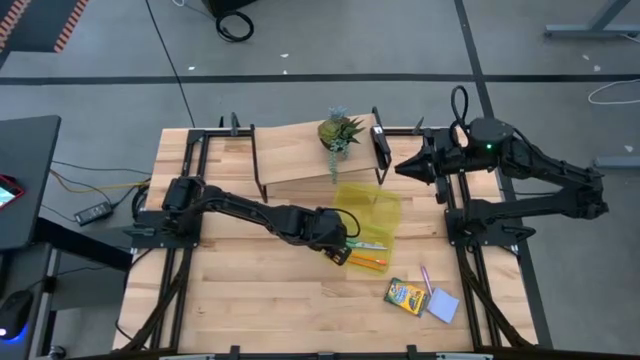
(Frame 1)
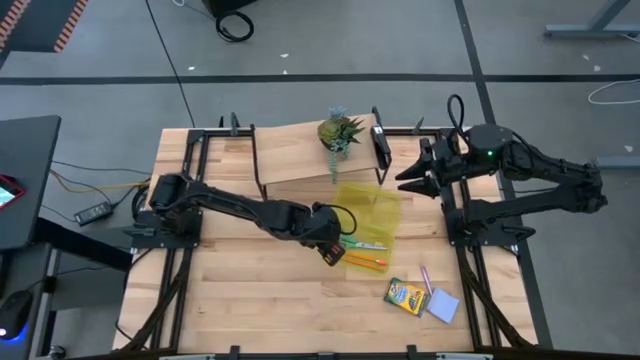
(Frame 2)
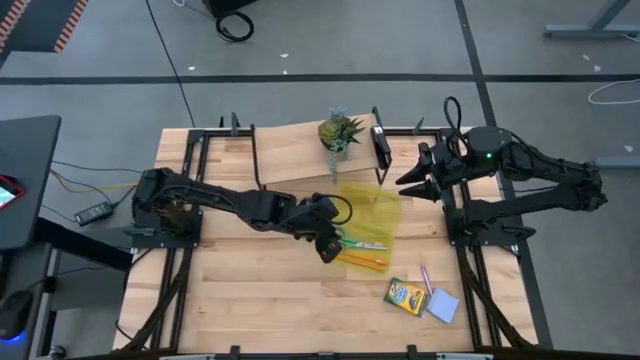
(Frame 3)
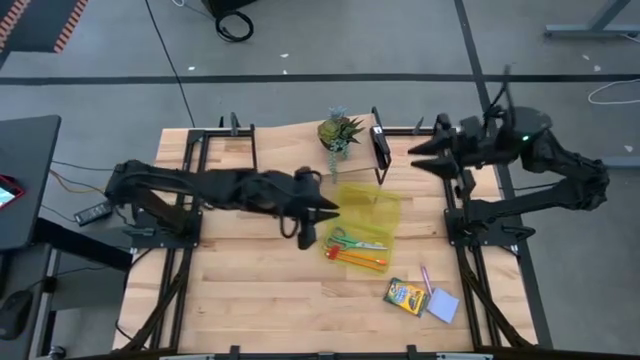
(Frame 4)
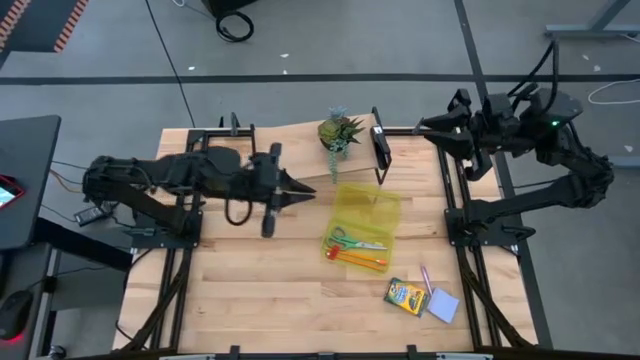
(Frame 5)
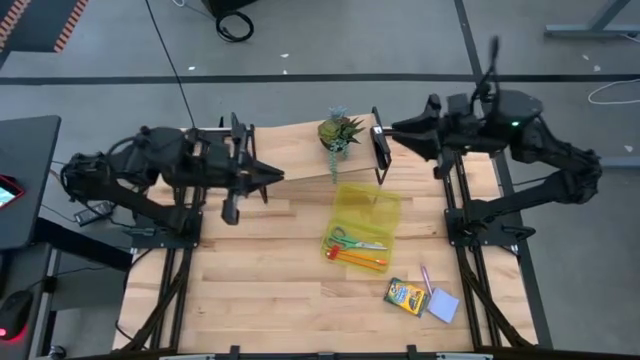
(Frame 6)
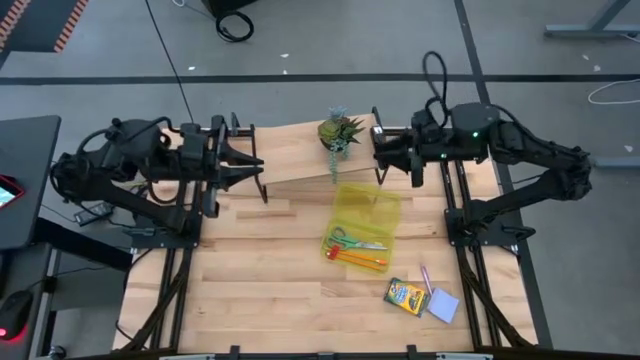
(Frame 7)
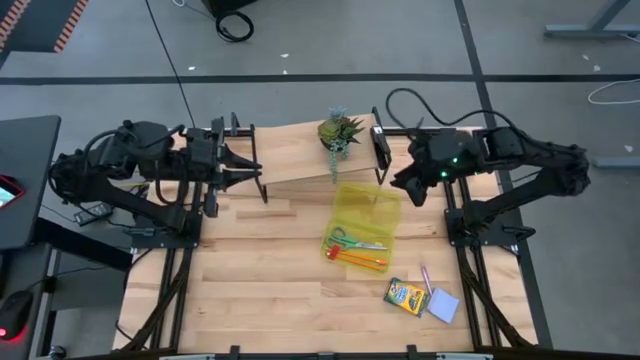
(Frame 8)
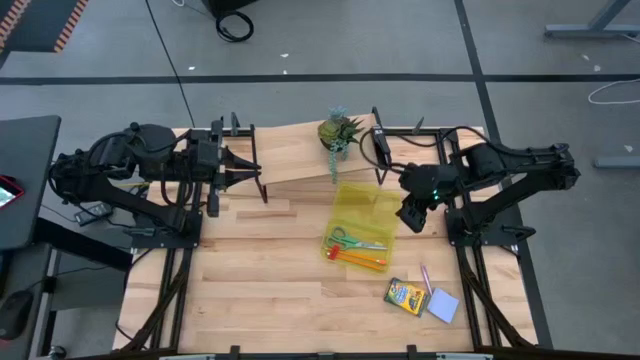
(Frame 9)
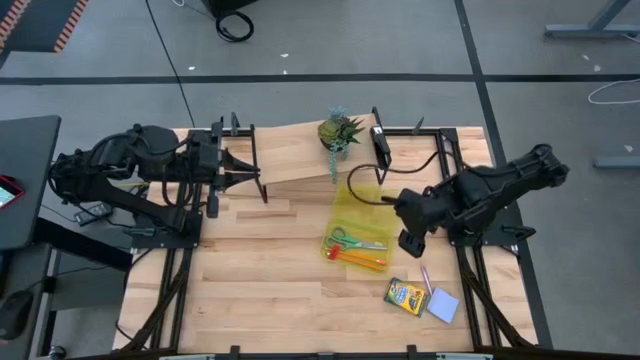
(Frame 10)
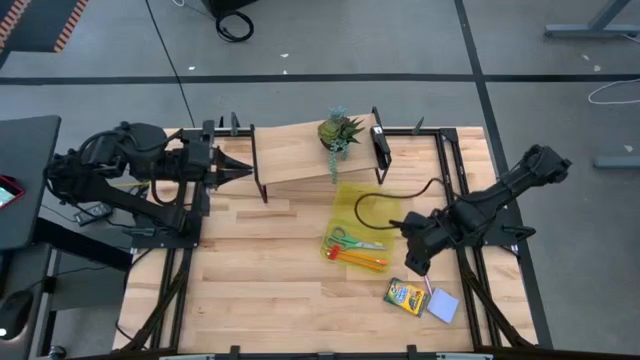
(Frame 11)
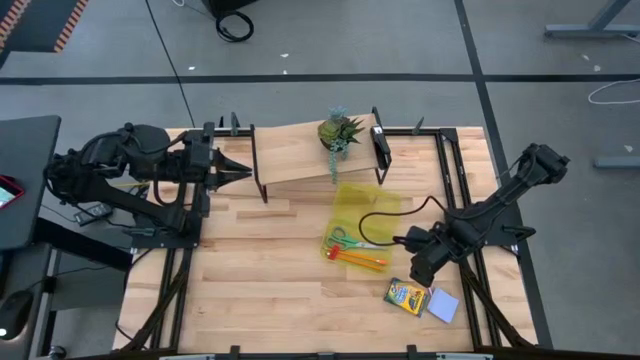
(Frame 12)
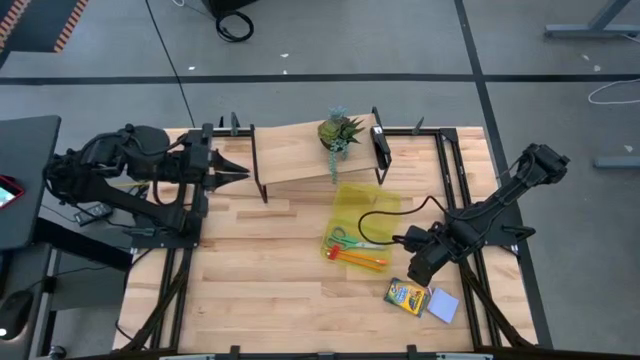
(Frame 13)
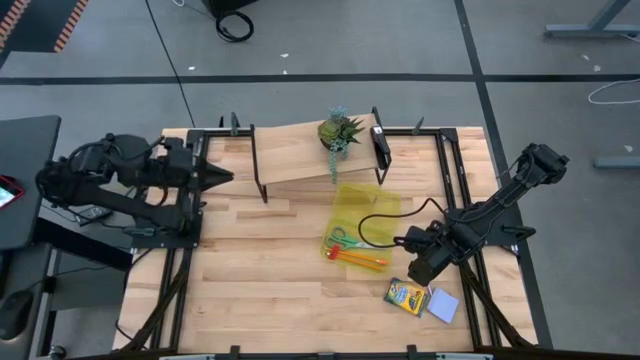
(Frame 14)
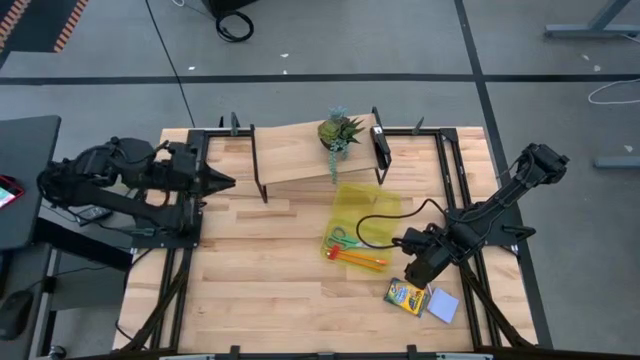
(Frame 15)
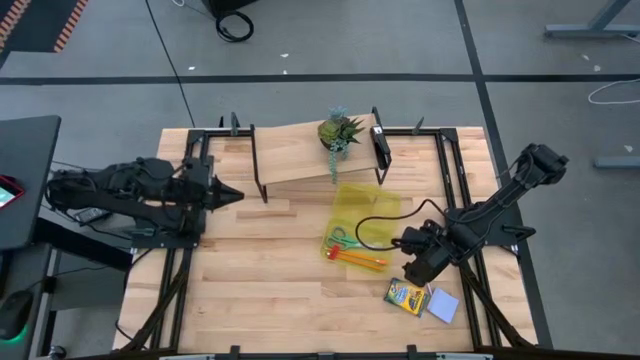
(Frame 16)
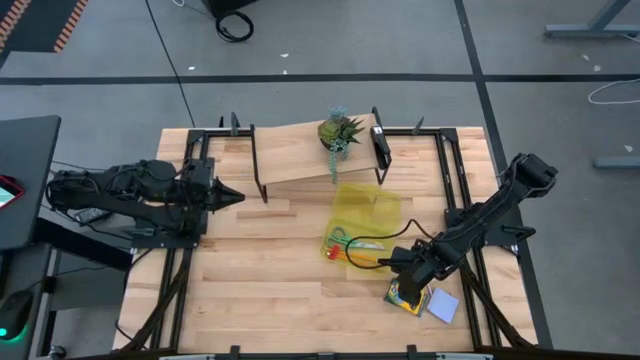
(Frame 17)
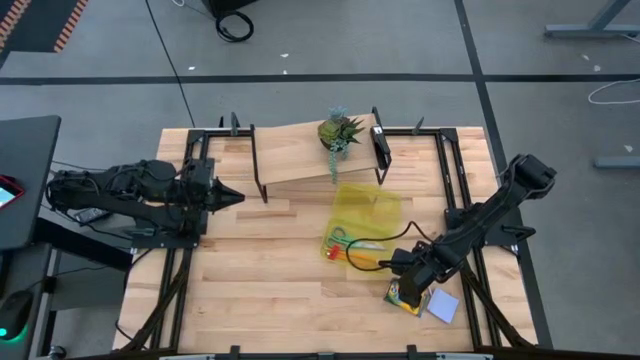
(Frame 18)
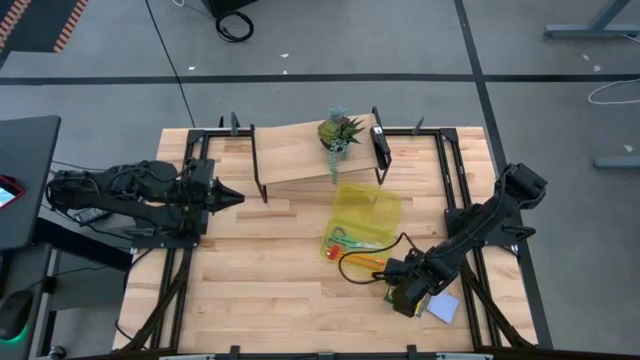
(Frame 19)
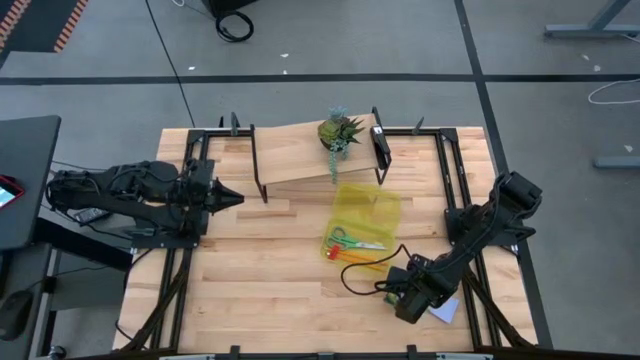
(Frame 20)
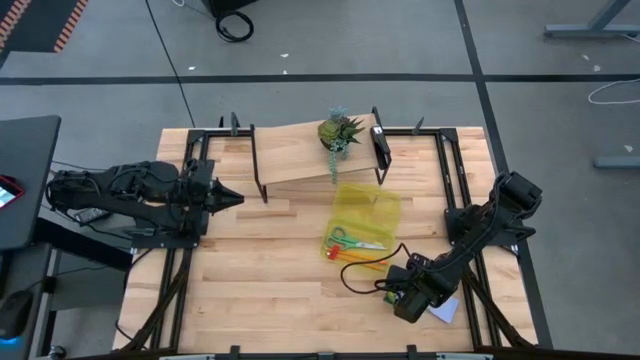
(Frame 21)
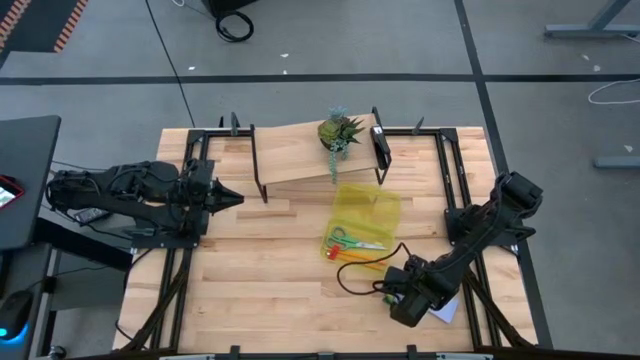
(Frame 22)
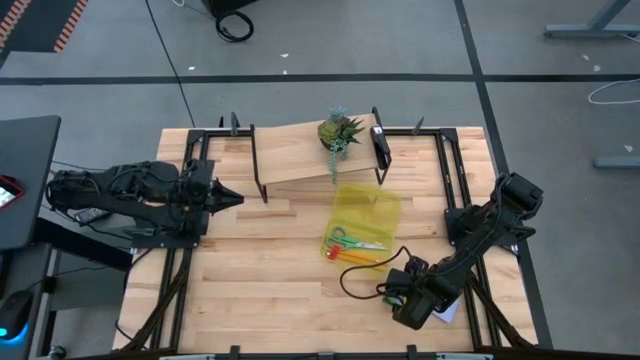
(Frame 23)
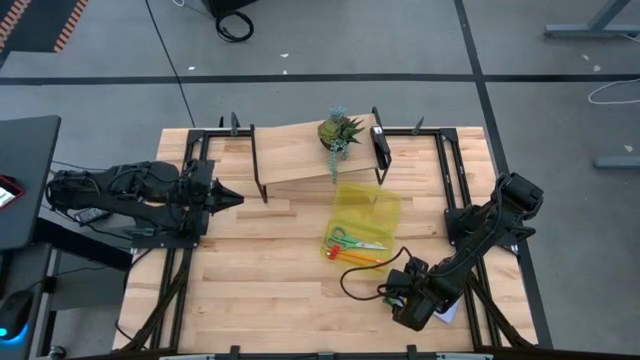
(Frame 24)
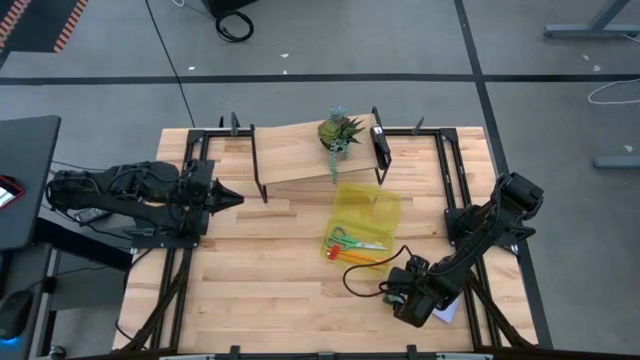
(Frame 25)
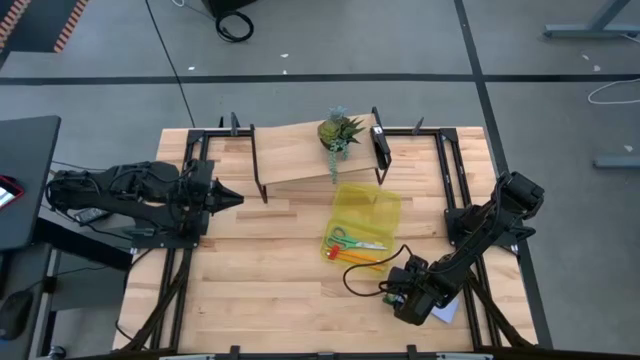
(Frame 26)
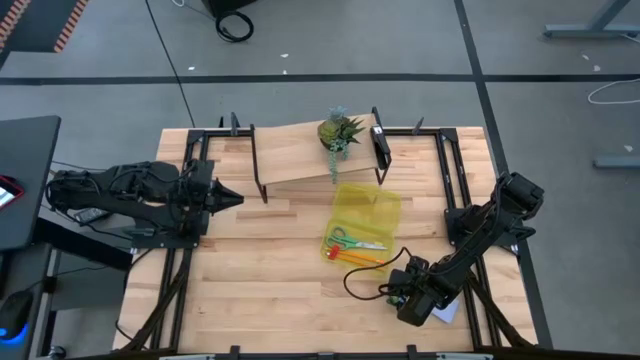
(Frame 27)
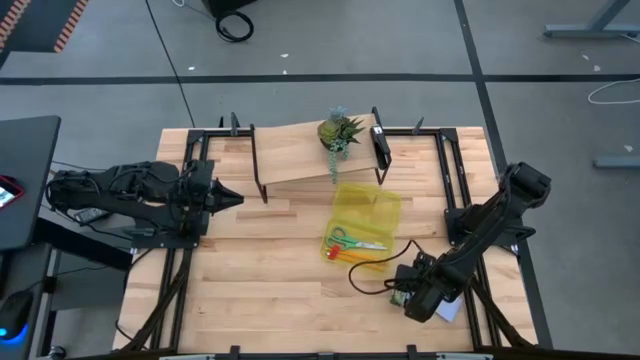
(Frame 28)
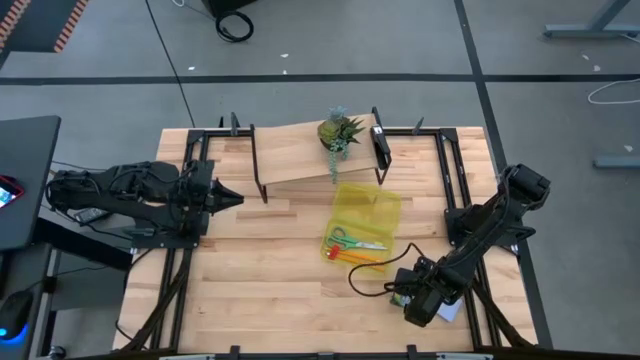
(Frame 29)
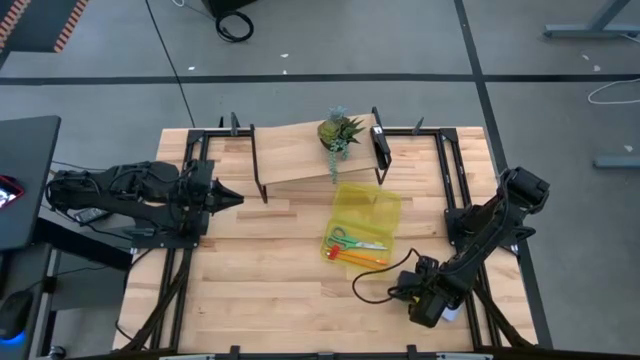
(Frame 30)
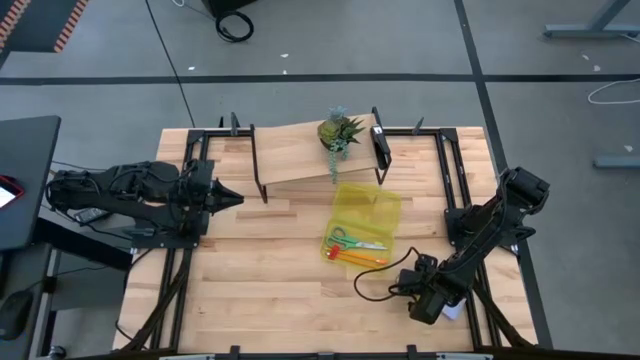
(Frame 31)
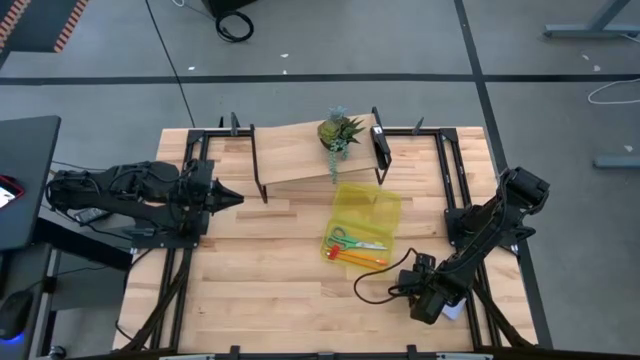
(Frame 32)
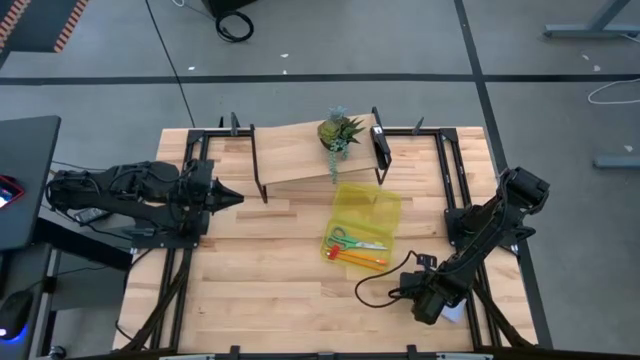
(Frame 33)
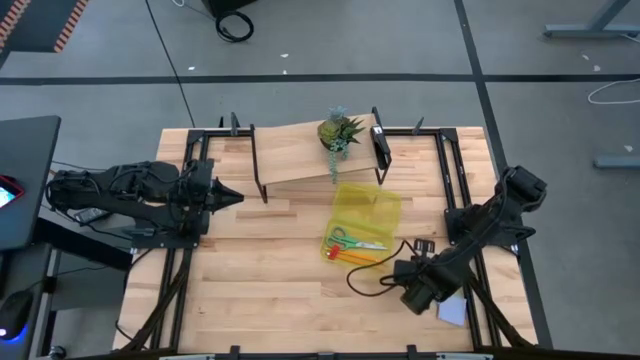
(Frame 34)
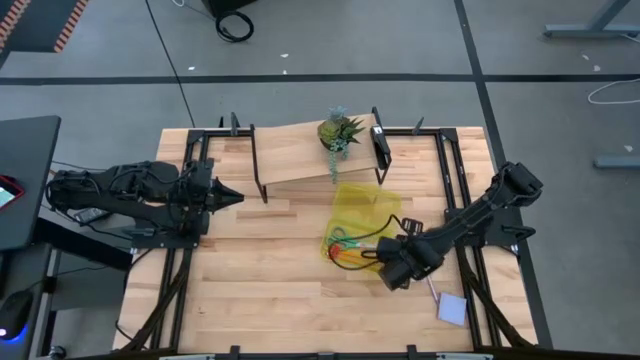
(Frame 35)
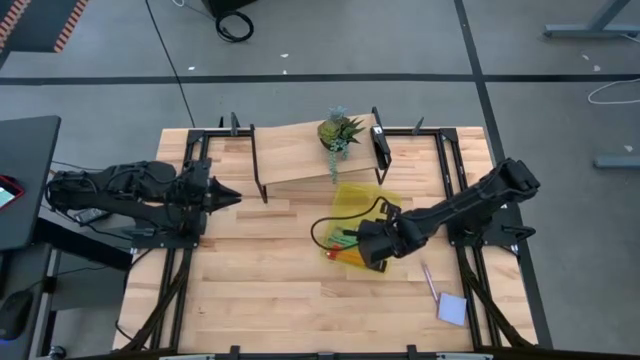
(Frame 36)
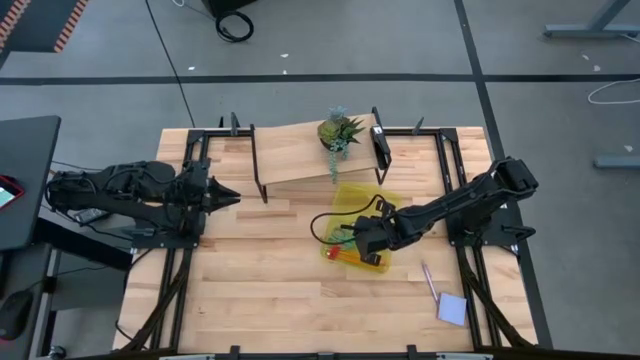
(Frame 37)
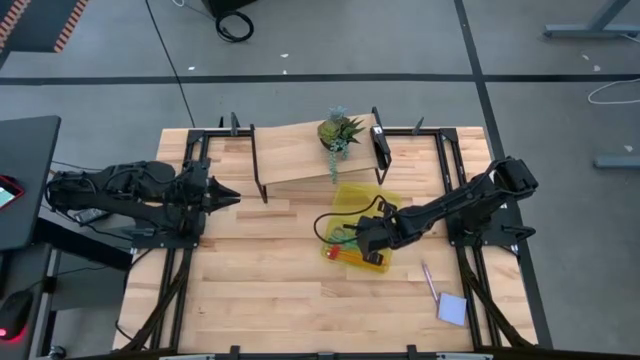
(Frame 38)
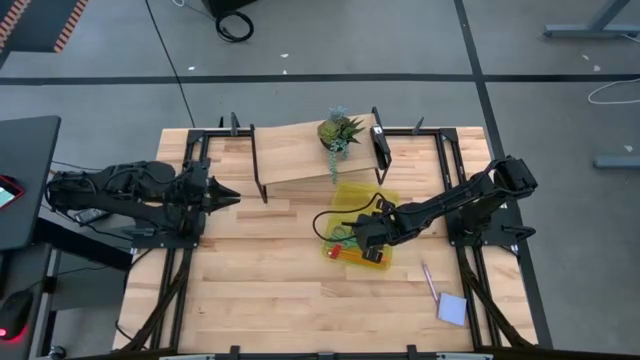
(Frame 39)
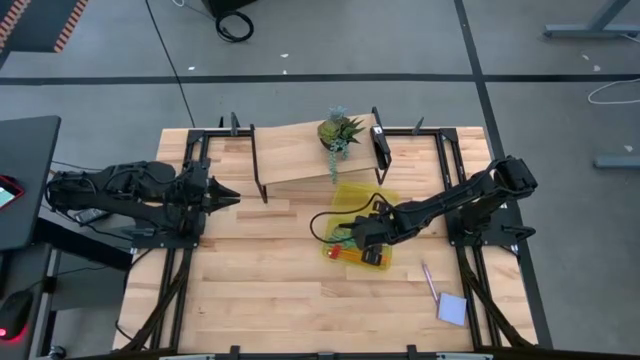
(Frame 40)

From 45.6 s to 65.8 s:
Task: Pack school essentials
Put the yellow crayon box into the yellow supply box

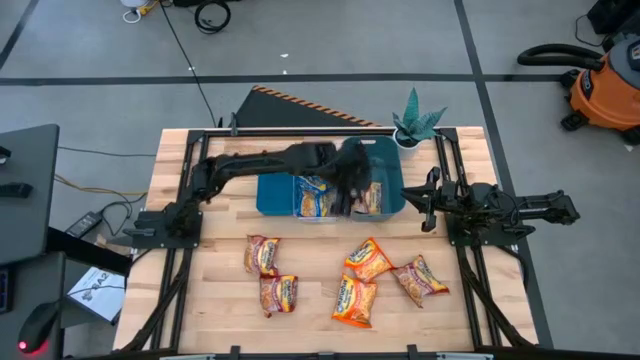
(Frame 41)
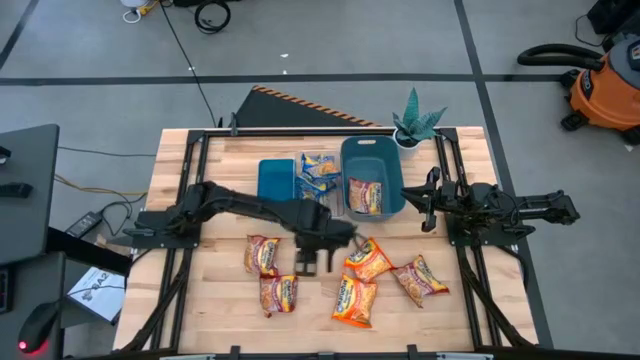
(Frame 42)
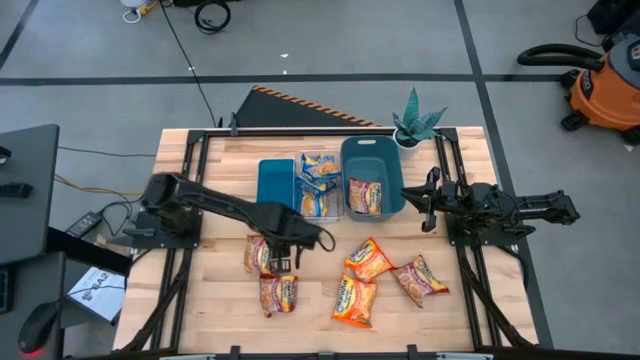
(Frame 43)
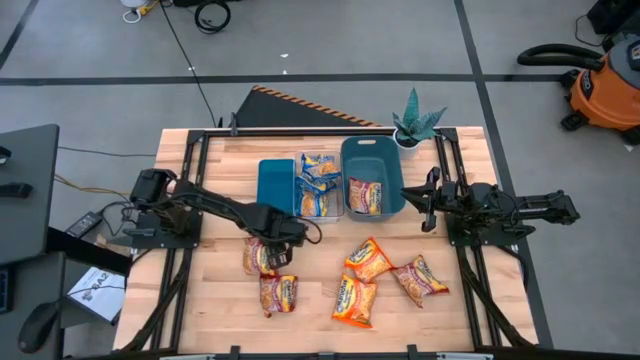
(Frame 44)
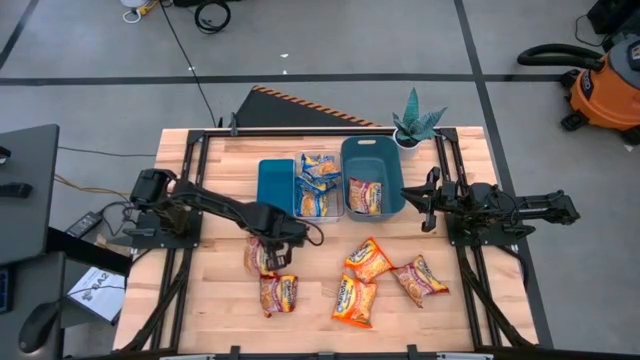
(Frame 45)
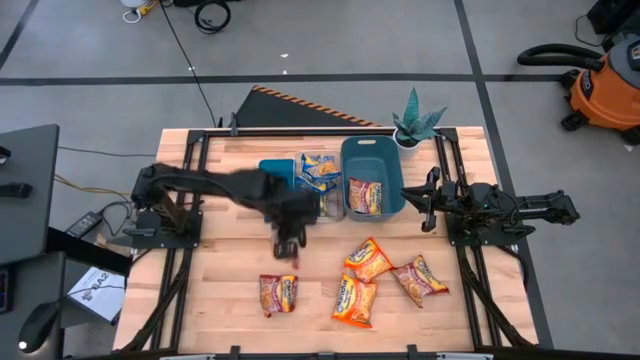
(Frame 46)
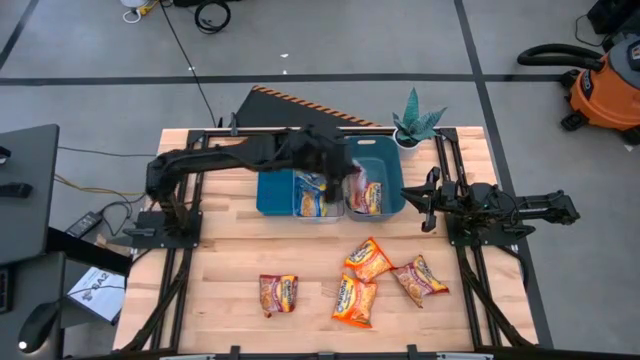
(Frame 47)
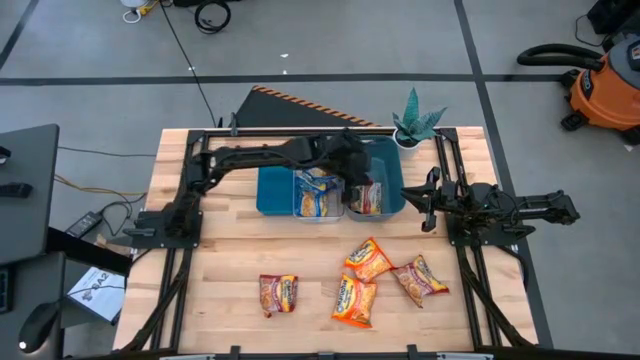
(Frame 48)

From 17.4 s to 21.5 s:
Task: Sort Maruchan noodles
Put the left red noodle into the green bin
